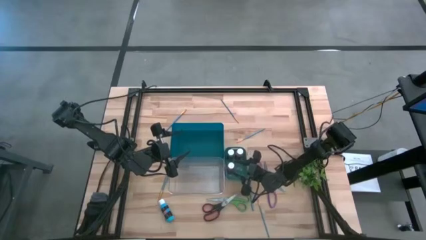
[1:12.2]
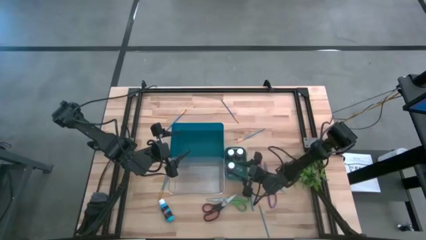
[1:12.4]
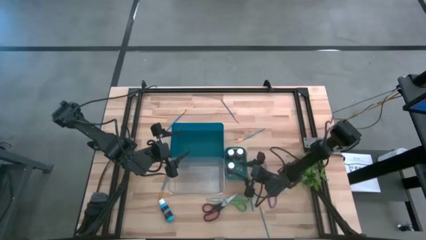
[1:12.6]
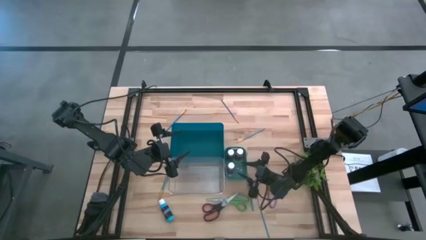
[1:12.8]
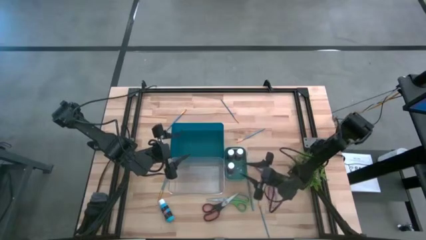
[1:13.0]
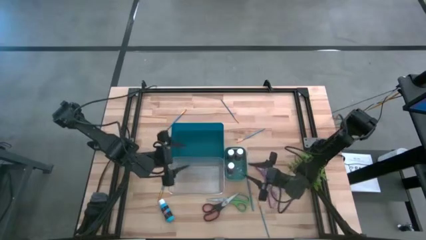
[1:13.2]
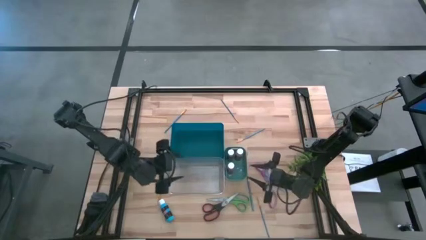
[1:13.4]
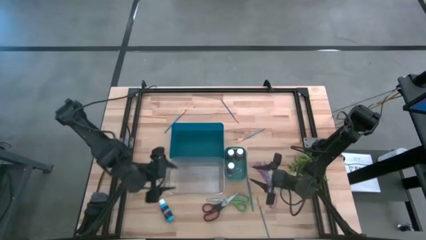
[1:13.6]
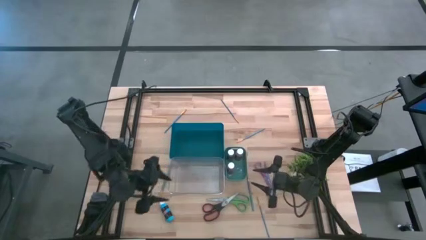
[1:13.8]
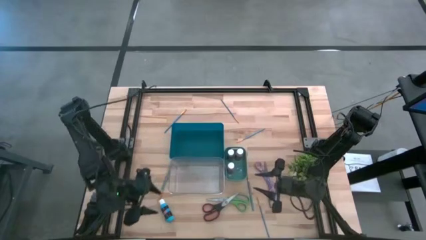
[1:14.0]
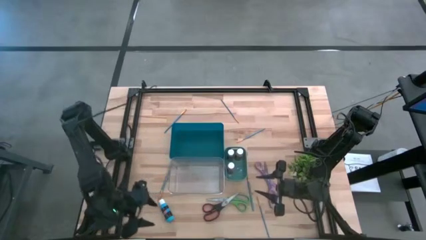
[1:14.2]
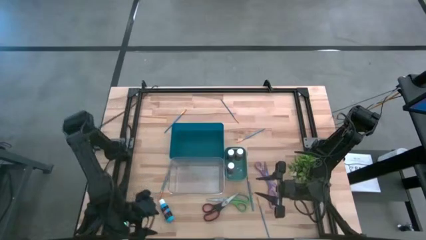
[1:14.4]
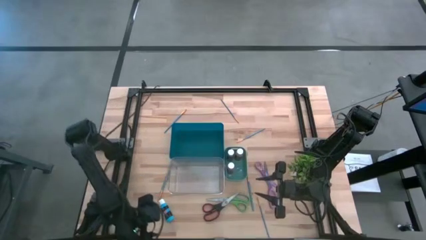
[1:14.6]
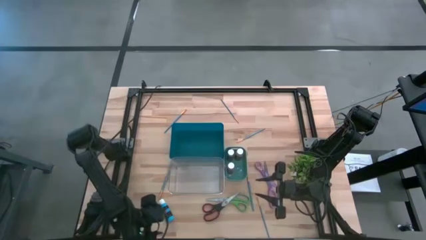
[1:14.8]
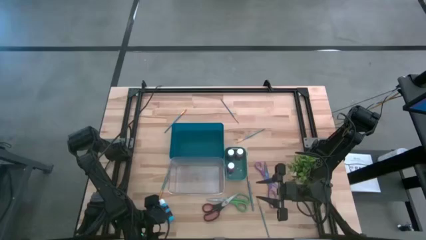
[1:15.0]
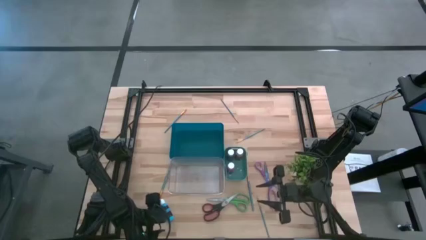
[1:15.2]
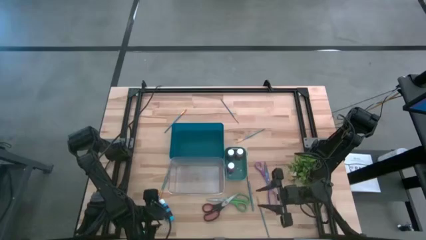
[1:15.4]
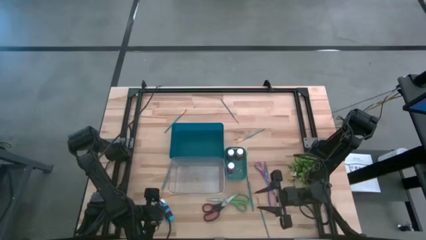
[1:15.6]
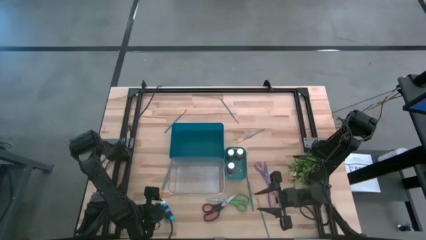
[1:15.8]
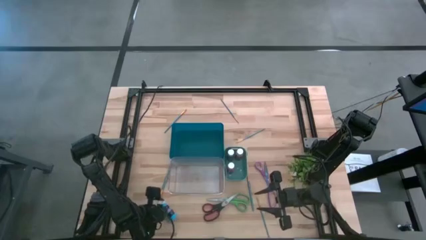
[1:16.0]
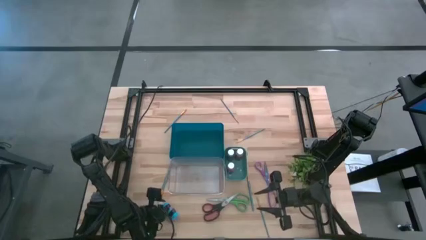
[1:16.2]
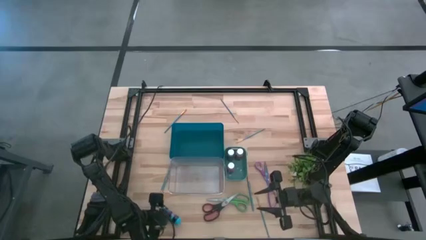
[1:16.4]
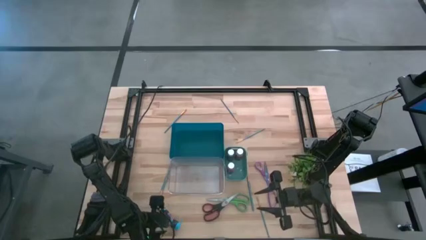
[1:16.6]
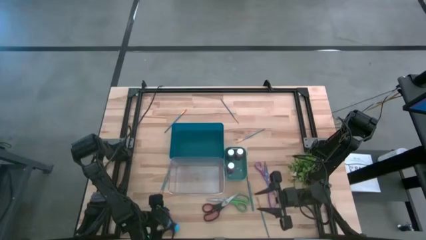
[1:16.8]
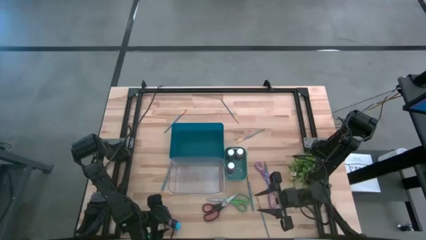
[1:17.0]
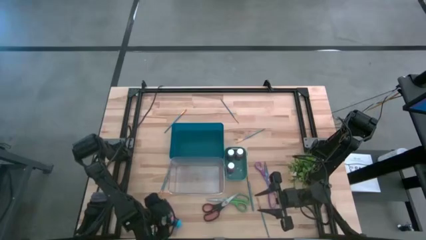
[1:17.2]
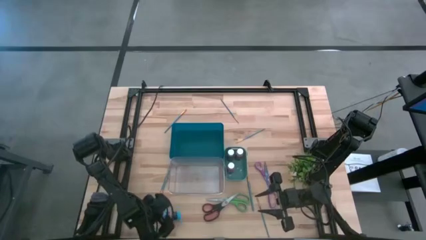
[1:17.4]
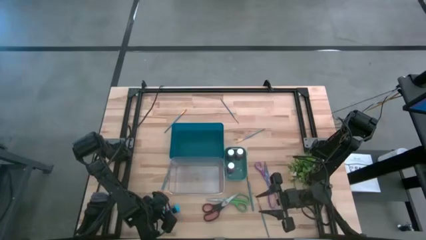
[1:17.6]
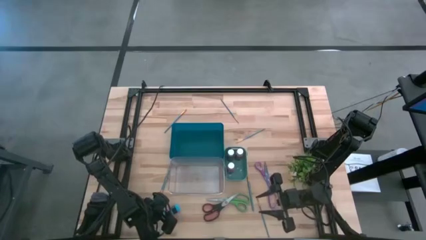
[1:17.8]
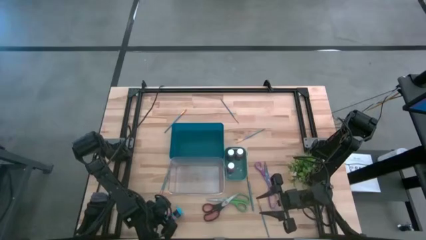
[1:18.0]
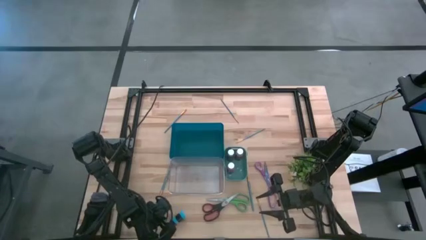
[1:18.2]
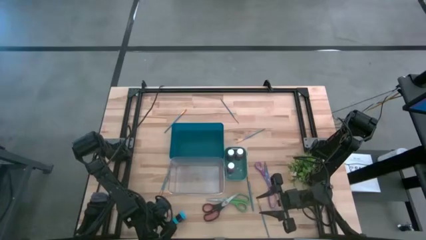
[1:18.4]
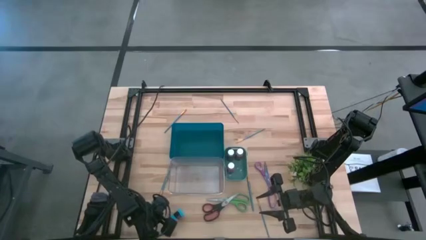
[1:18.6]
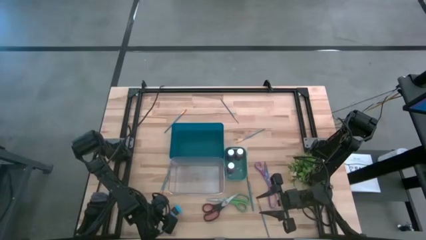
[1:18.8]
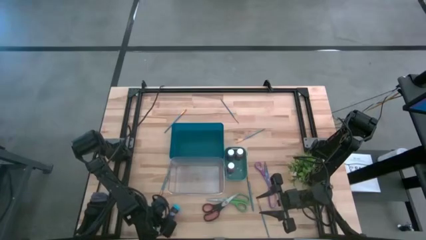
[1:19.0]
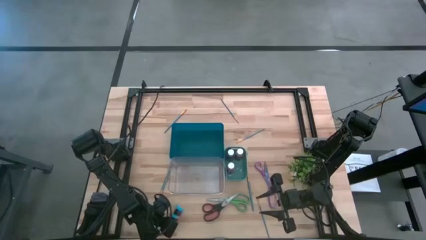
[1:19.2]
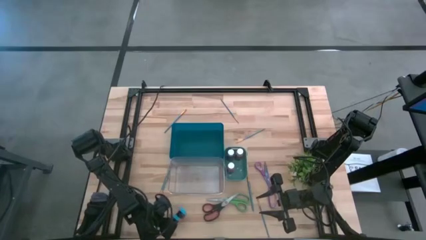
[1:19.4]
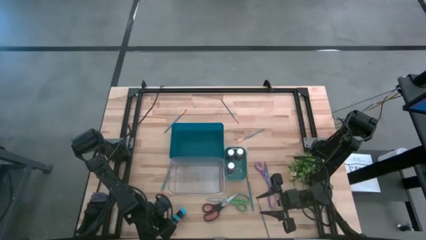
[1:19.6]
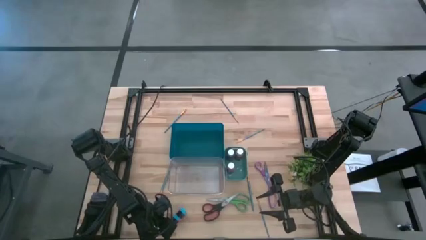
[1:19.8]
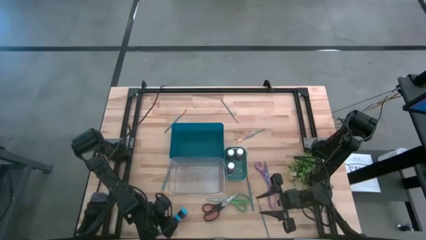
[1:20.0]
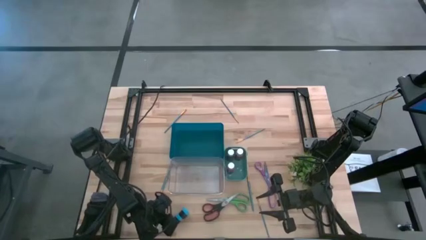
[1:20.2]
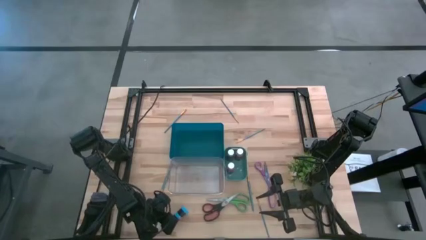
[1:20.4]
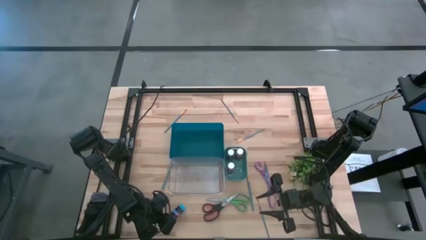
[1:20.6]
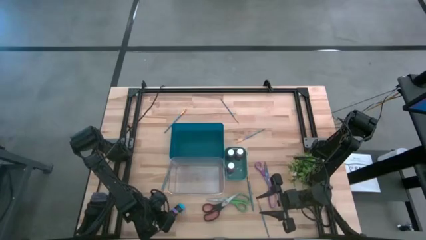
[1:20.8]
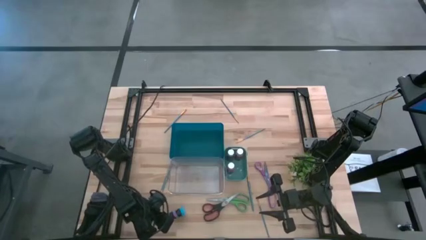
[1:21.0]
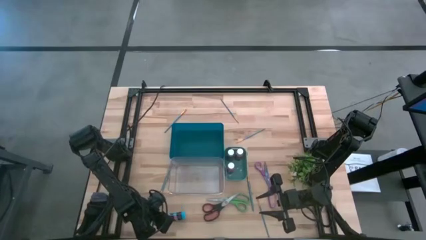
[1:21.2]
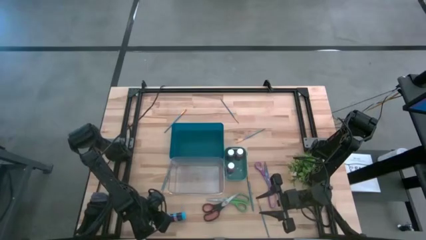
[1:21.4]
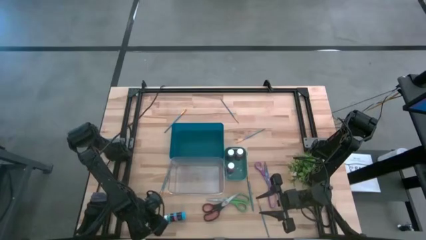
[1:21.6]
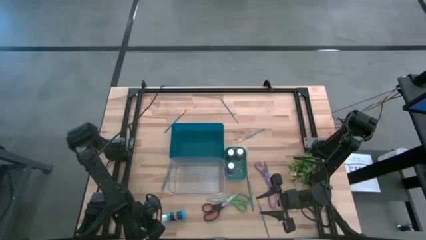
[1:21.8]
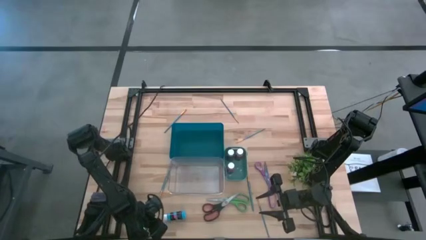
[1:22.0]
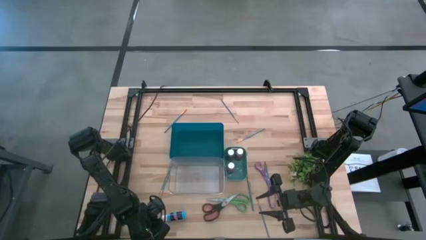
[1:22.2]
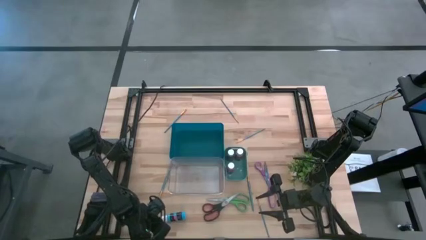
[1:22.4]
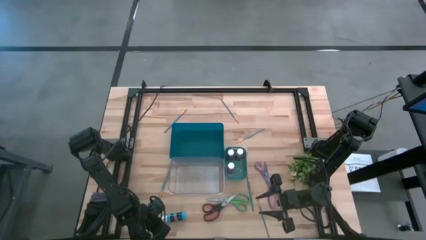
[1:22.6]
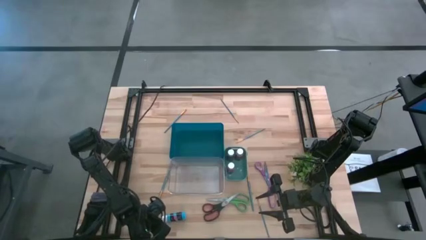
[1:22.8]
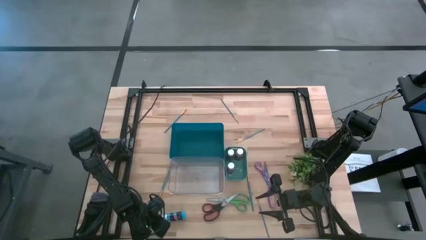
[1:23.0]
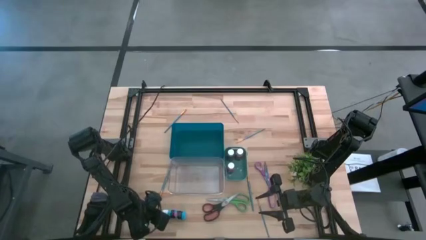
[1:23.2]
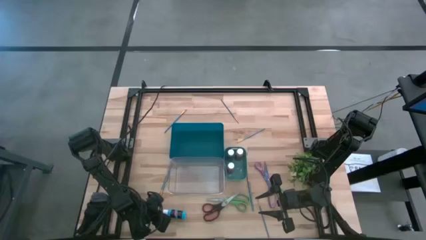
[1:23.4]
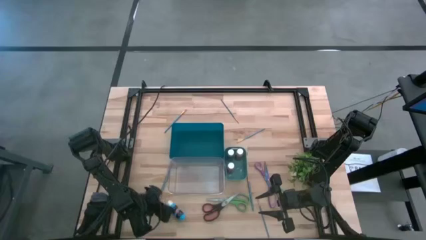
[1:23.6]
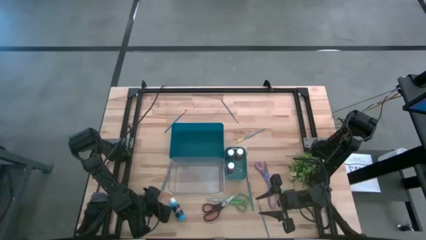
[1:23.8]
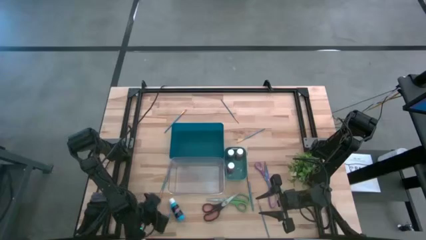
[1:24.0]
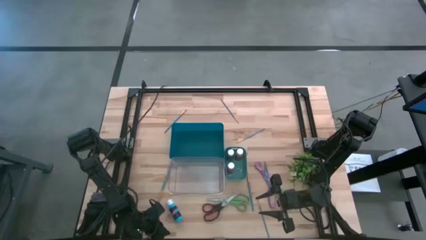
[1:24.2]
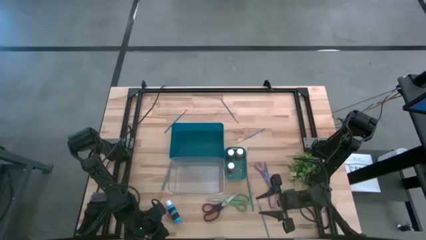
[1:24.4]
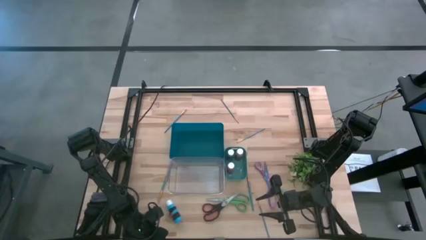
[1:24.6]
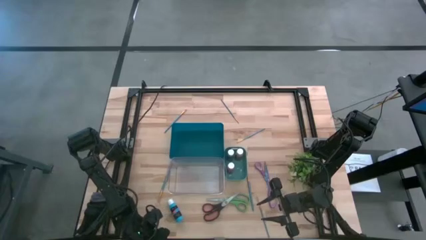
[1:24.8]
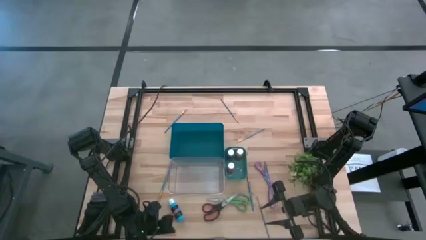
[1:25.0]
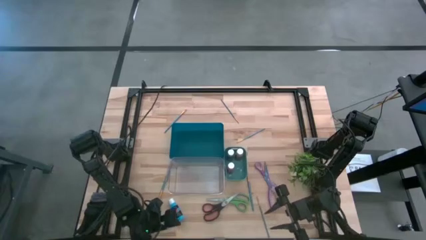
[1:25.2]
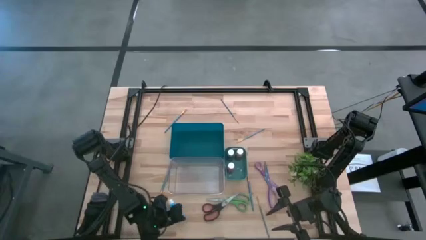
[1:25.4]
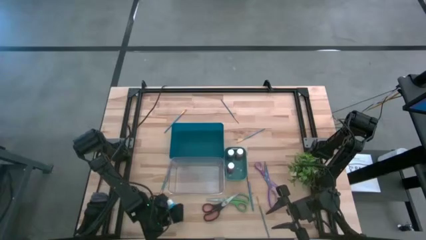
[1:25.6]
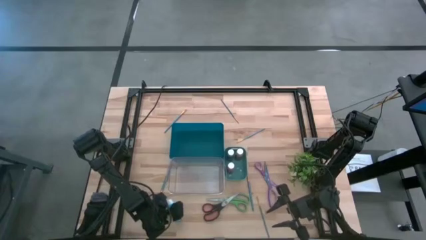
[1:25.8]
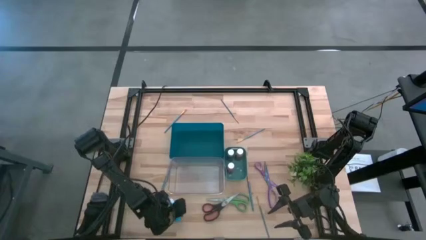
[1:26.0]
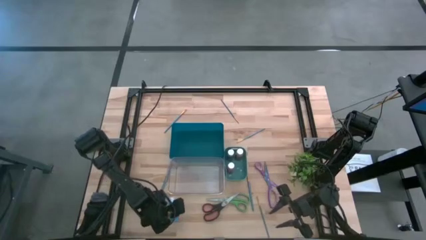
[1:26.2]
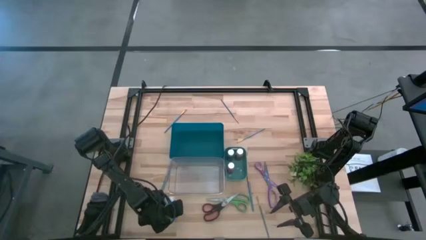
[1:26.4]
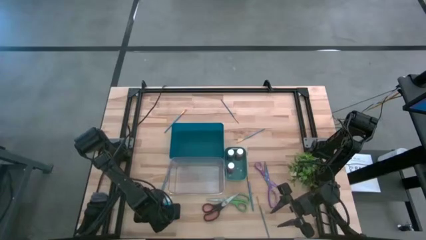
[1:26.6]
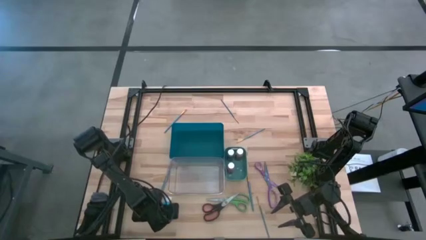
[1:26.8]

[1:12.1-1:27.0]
Task: Pick & Place Paint Supplies
Put the blue paint bottle into the green bin
